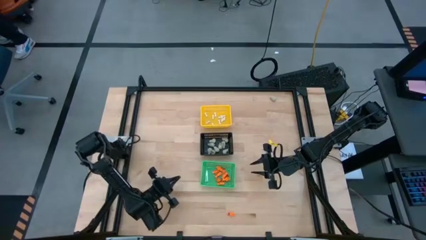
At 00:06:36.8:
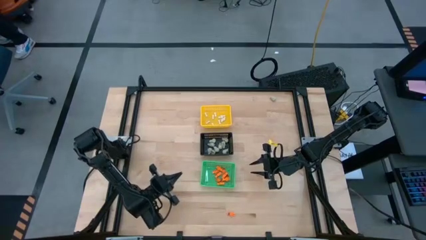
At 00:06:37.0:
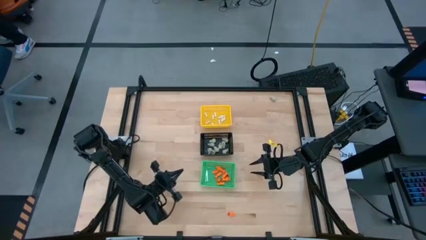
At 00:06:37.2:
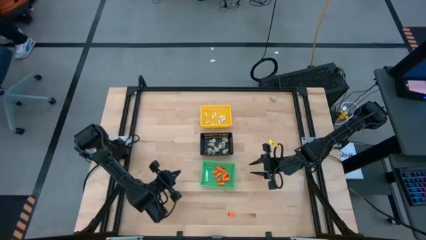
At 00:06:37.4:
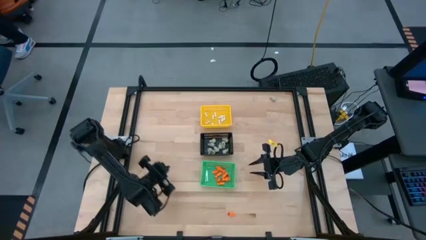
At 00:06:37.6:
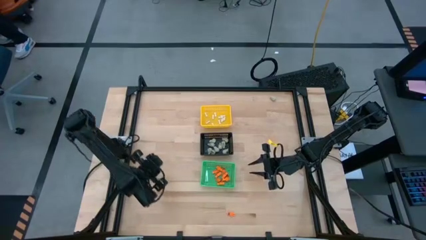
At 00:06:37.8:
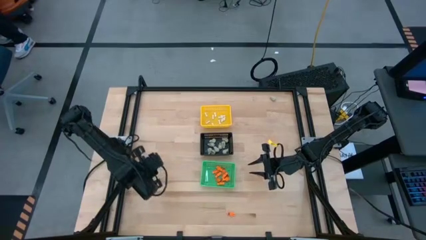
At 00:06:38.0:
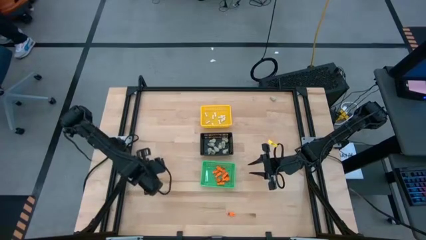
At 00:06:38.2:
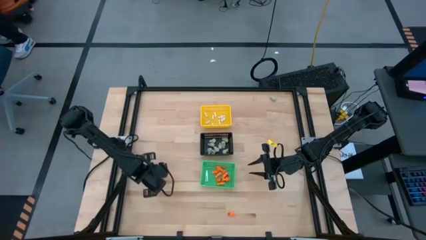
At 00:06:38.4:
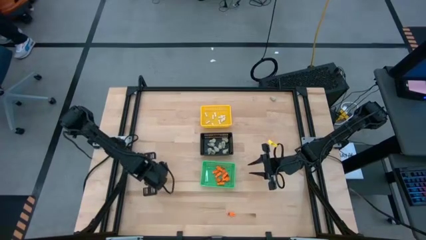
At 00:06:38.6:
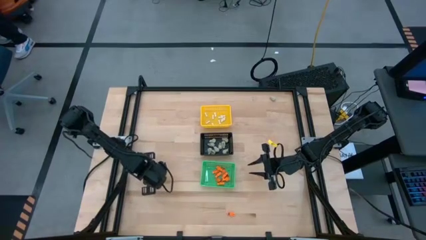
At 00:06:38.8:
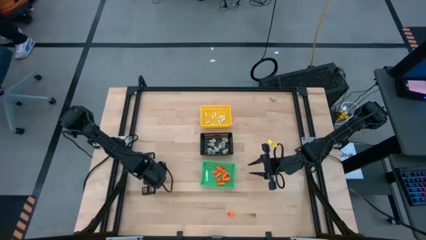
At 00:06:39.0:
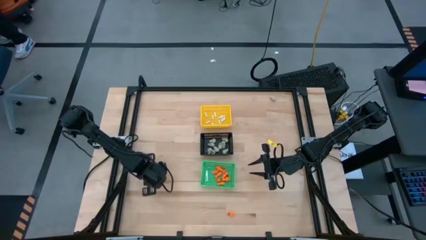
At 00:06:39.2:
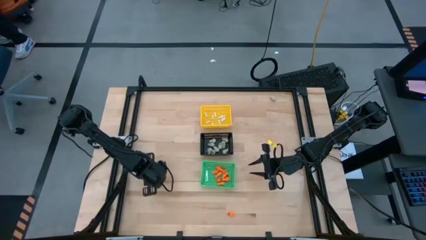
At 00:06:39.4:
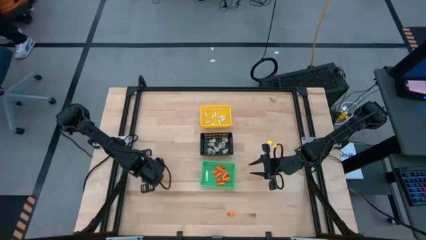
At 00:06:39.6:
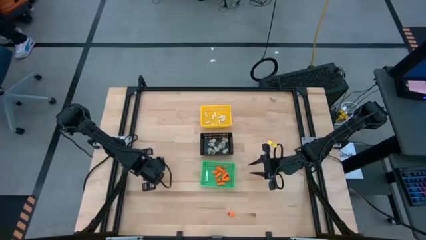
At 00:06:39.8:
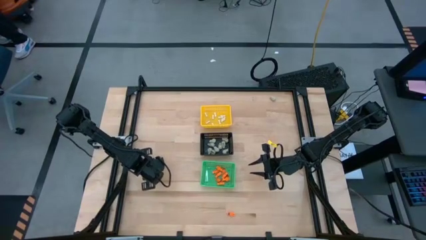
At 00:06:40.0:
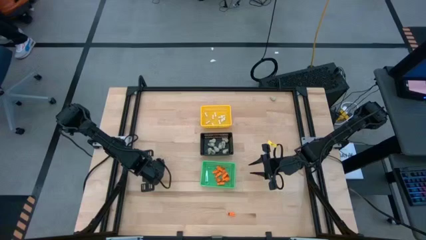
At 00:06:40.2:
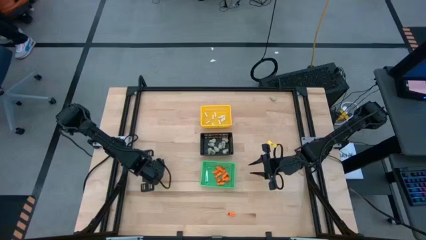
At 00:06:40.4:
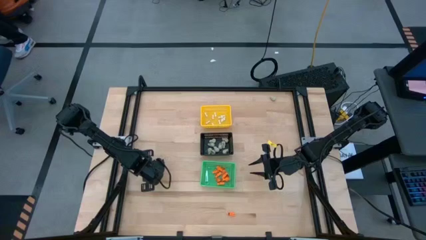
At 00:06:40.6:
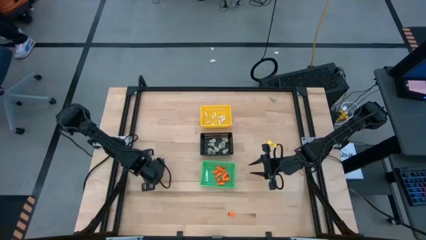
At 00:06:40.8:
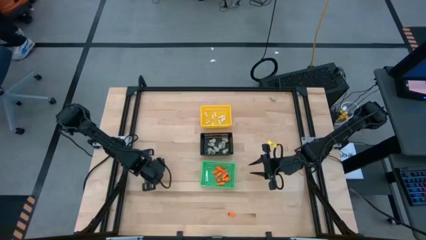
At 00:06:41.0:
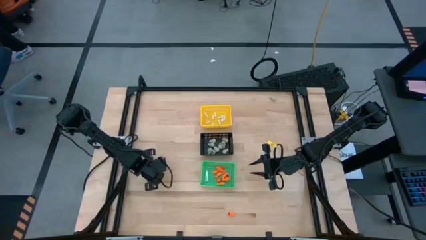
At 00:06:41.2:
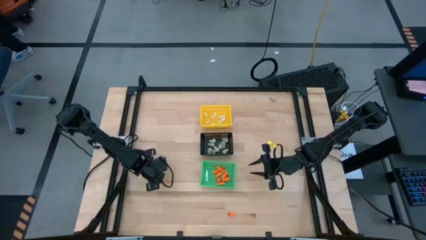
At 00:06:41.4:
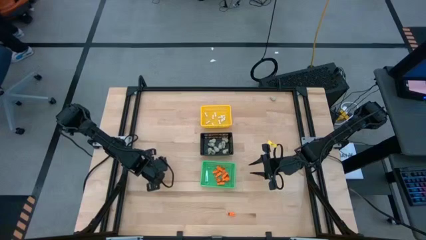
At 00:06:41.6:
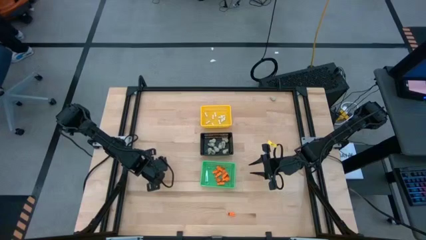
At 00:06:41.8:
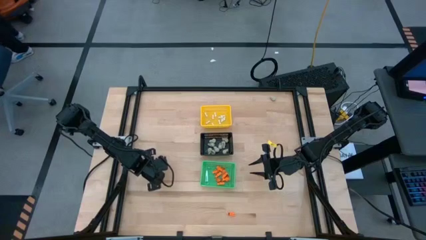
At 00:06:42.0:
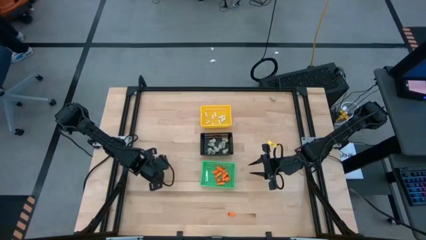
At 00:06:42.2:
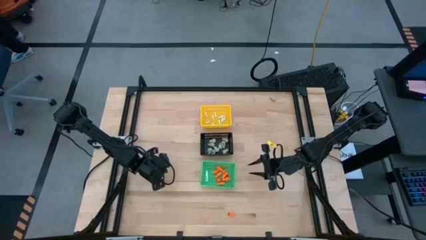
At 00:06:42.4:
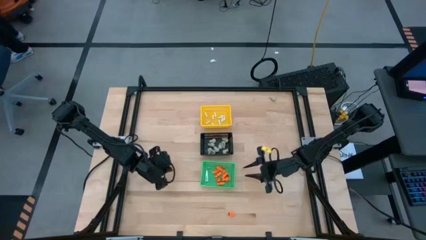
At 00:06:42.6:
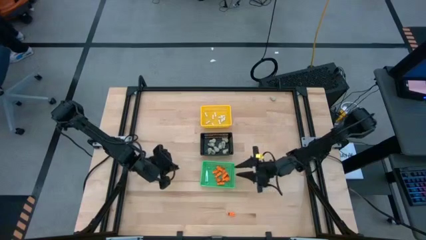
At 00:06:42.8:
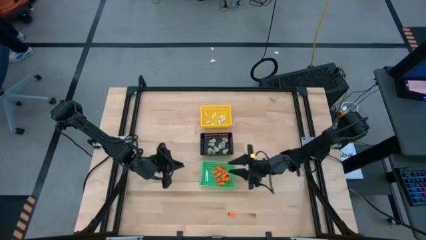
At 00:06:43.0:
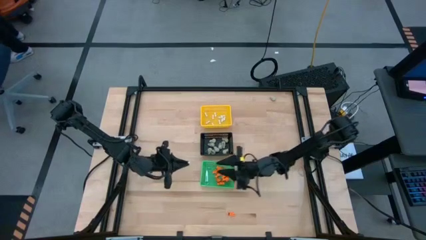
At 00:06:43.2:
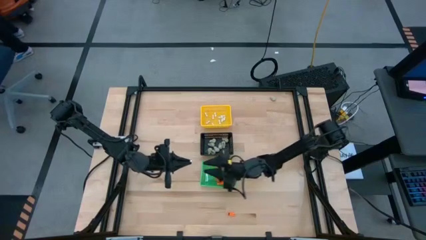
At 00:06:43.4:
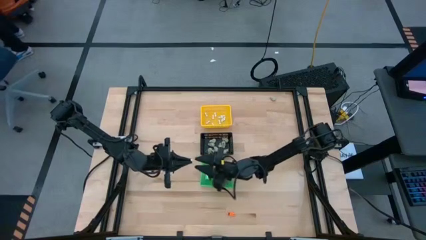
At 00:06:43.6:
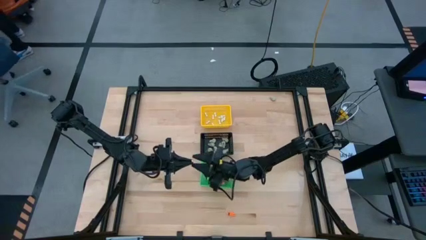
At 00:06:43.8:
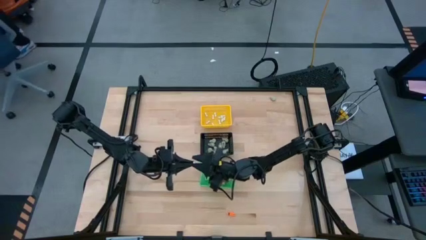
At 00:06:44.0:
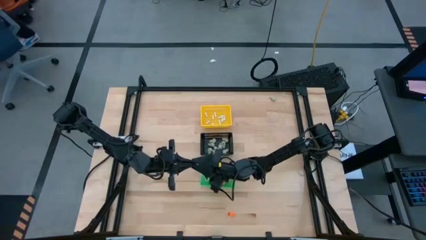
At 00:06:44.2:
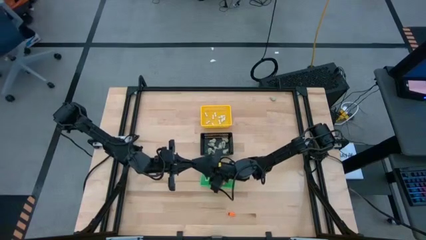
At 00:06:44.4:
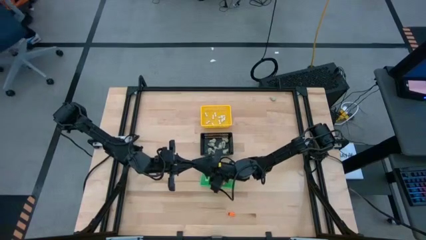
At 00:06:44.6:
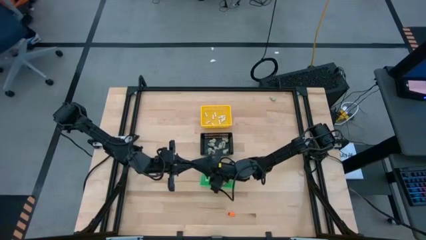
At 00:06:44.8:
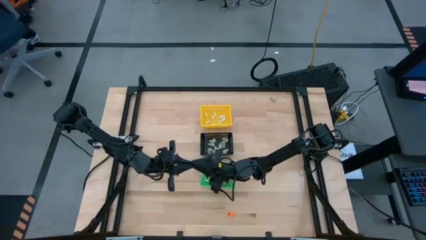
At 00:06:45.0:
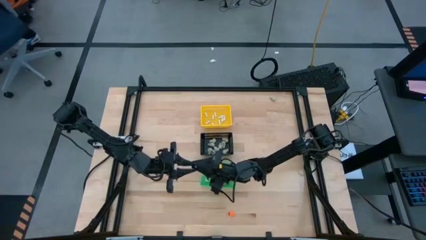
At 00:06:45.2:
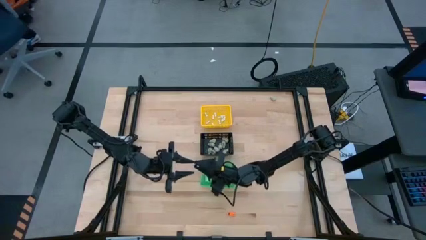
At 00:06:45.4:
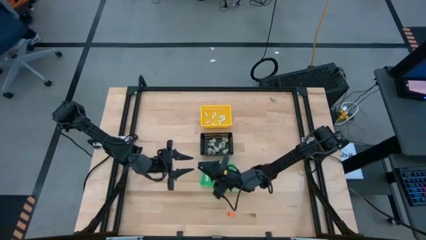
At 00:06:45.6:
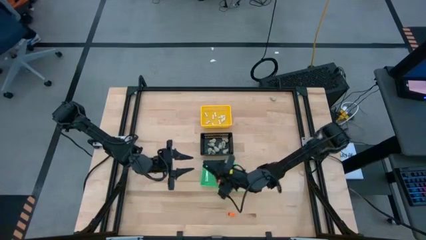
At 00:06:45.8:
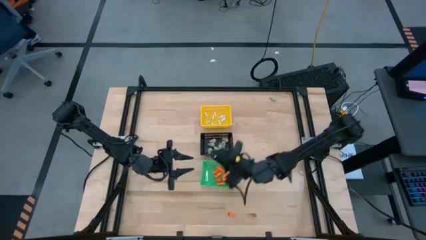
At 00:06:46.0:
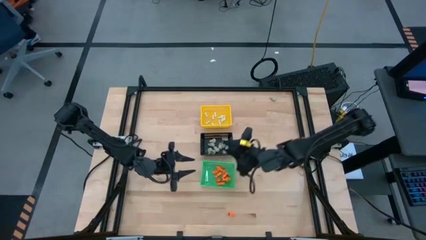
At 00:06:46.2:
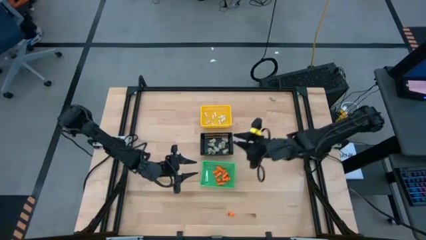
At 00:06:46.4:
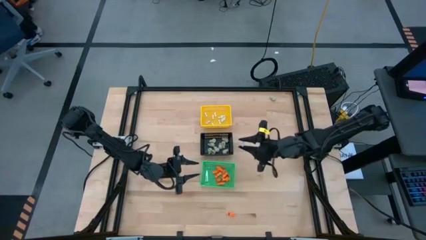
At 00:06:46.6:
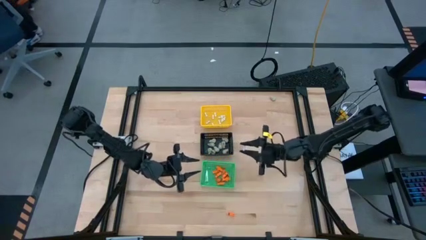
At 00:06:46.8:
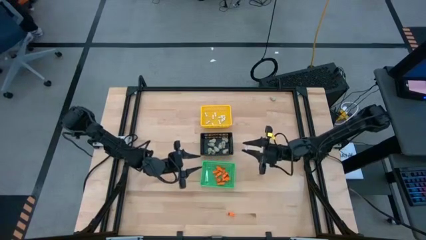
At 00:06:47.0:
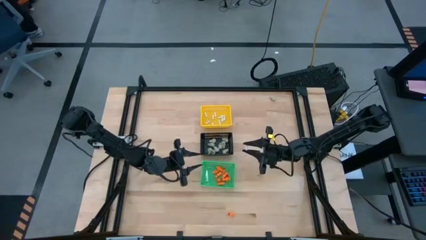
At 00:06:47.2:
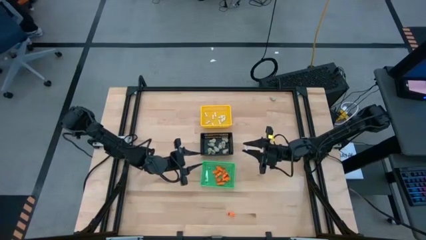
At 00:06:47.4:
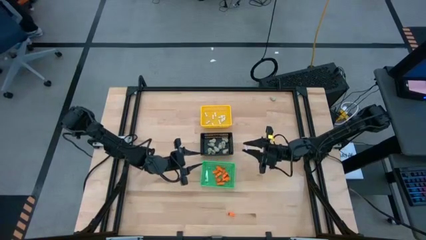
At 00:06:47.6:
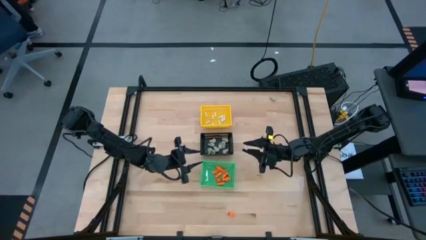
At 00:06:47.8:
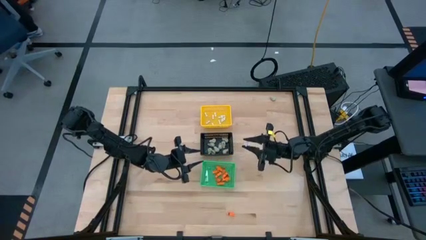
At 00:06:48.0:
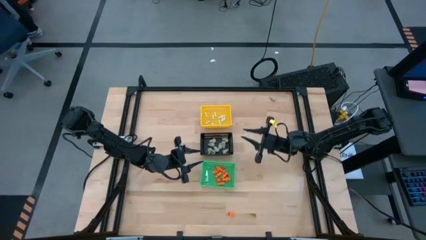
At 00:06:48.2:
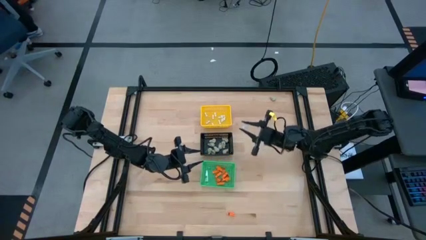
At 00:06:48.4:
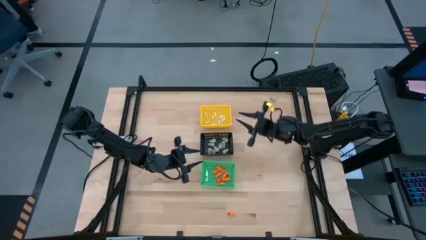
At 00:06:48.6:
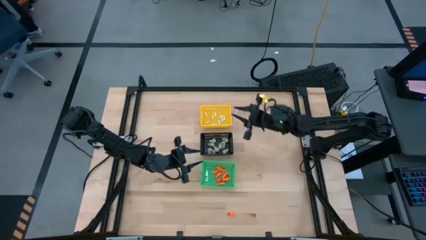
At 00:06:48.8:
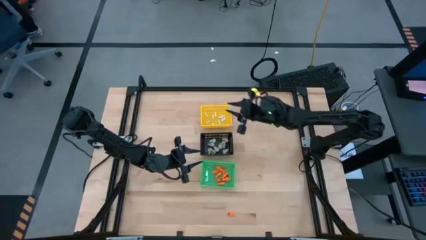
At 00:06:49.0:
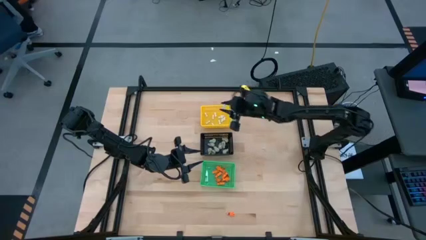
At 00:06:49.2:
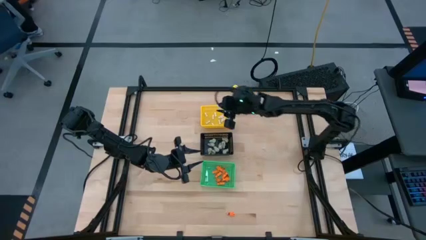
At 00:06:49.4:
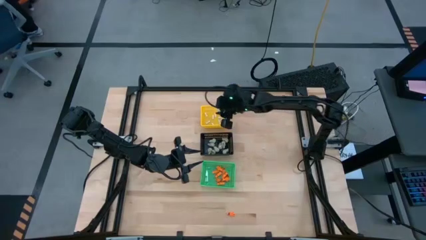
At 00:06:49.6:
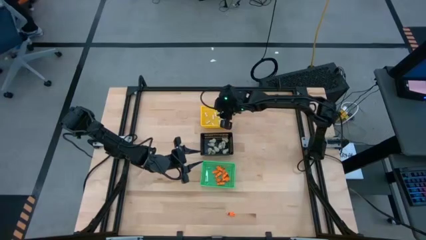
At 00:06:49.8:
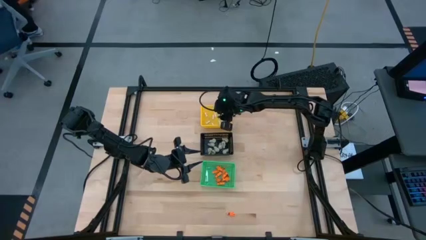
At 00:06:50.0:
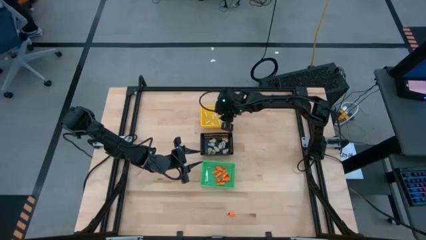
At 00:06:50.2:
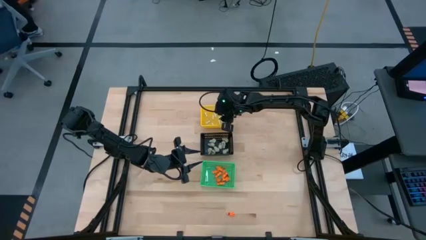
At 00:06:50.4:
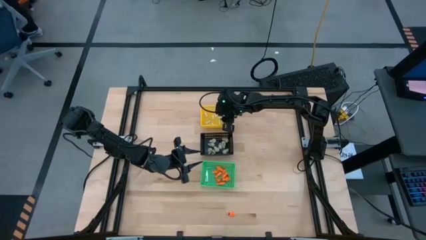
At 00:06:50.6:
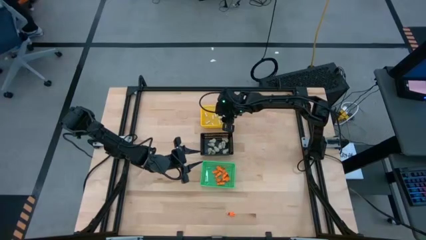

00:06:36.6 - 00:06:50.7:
Task: Sort Halloween decoration
Put the white bone toy into the yellow basket
